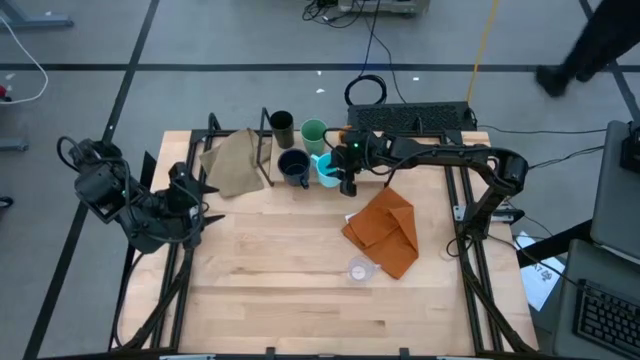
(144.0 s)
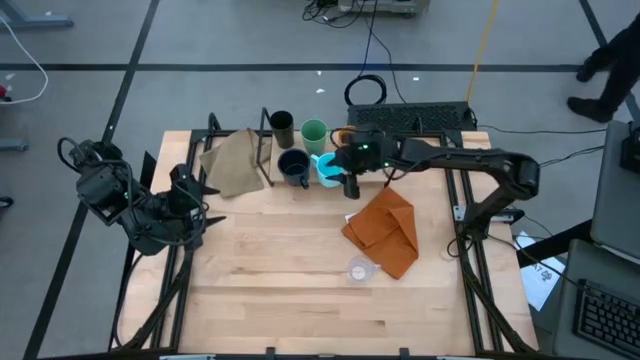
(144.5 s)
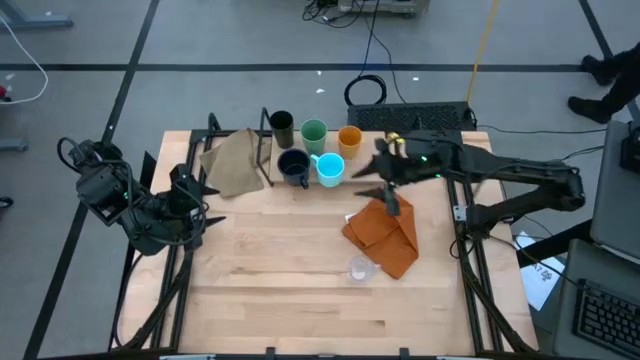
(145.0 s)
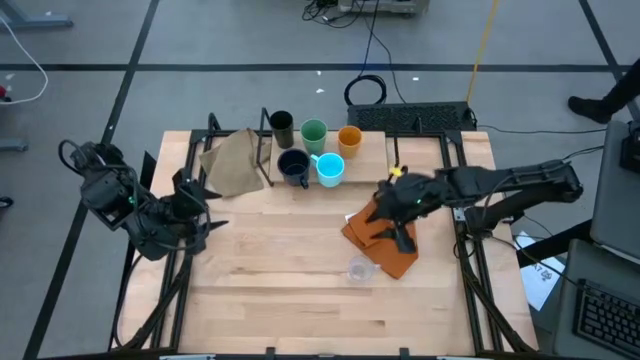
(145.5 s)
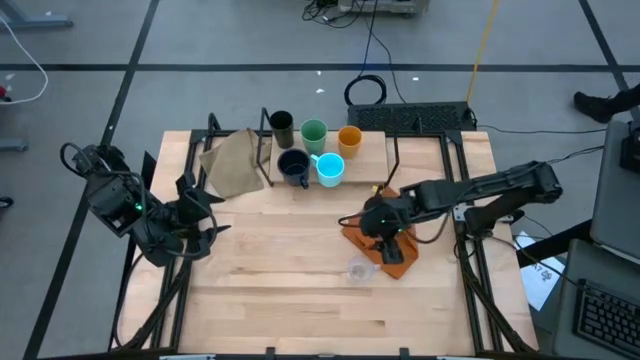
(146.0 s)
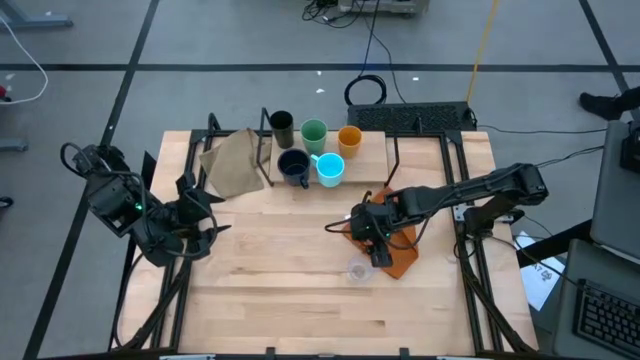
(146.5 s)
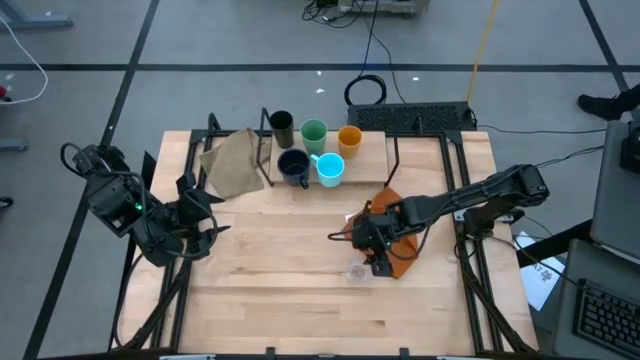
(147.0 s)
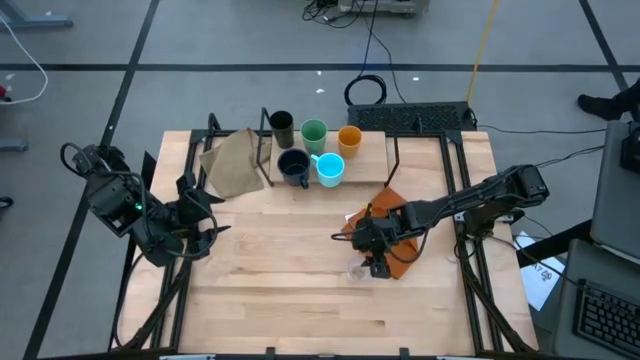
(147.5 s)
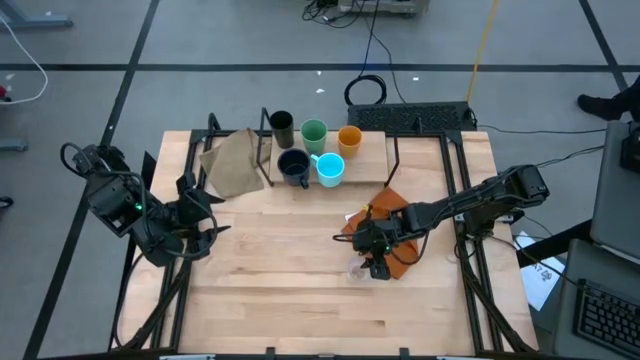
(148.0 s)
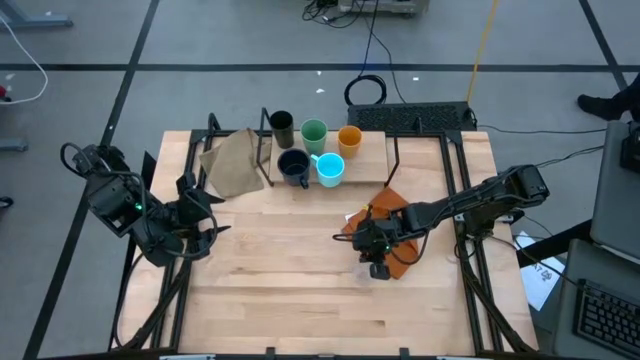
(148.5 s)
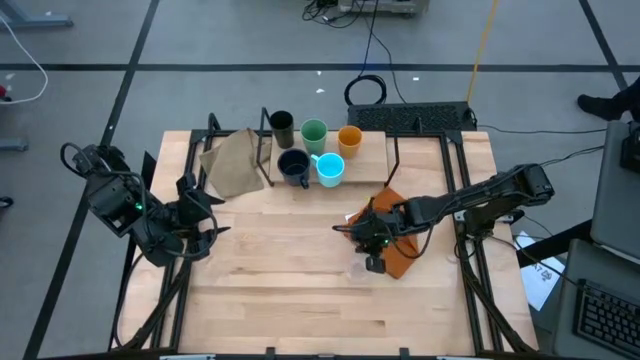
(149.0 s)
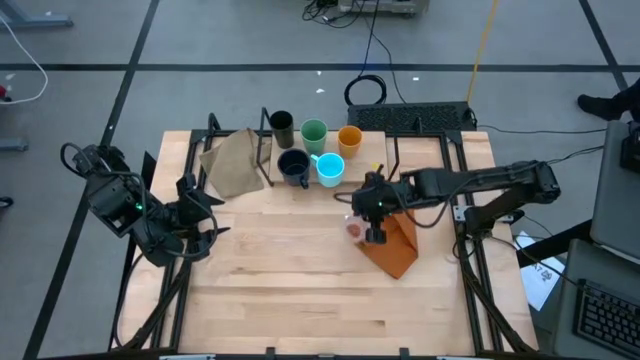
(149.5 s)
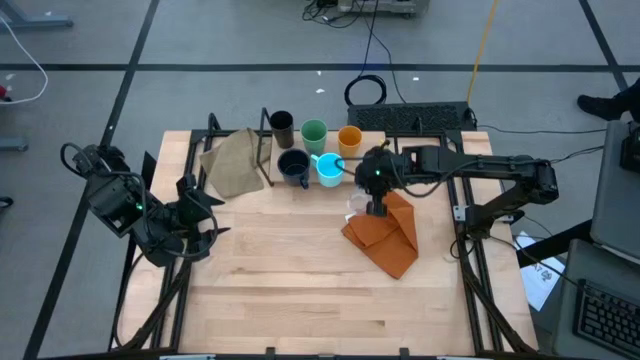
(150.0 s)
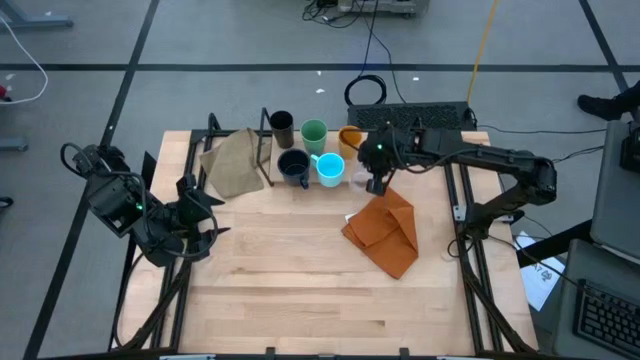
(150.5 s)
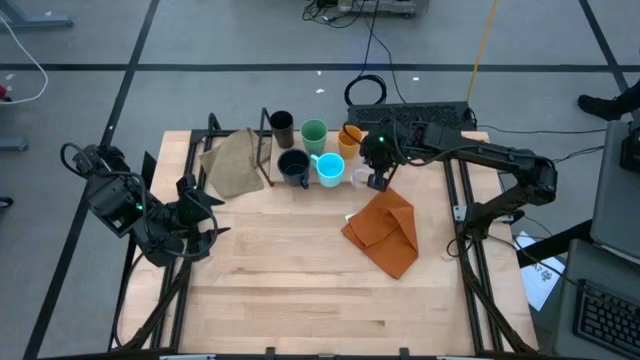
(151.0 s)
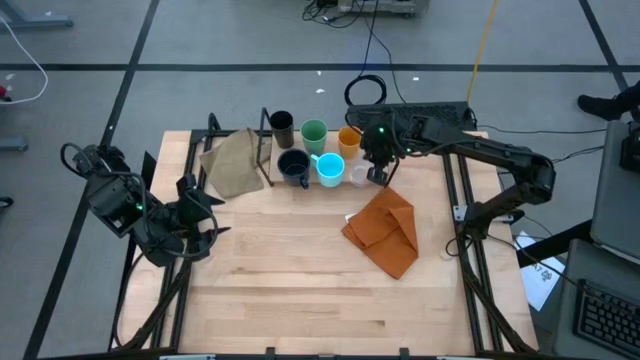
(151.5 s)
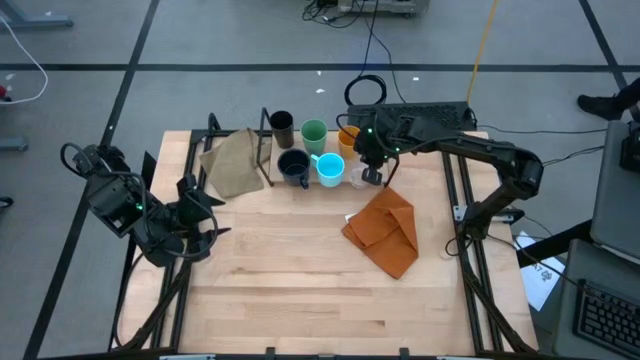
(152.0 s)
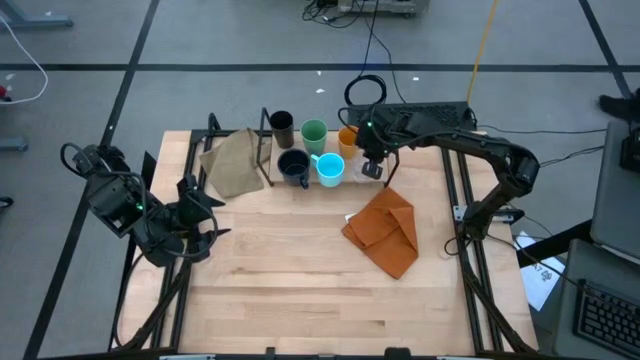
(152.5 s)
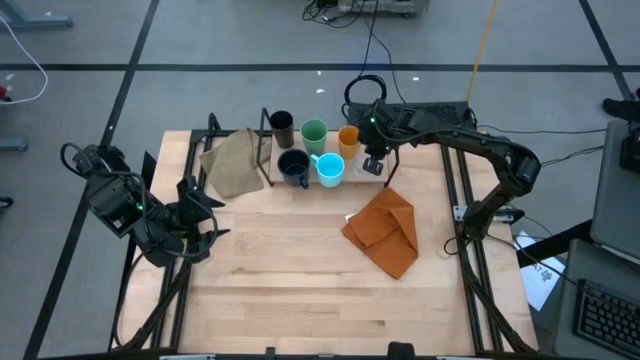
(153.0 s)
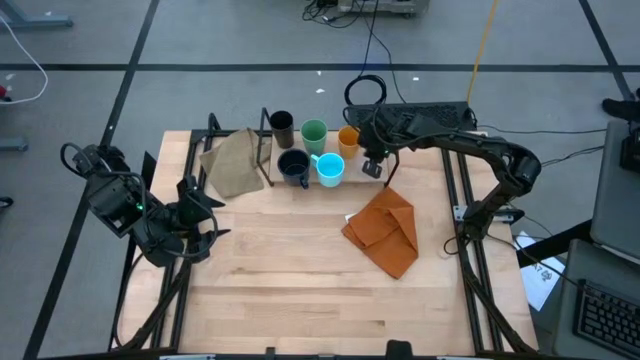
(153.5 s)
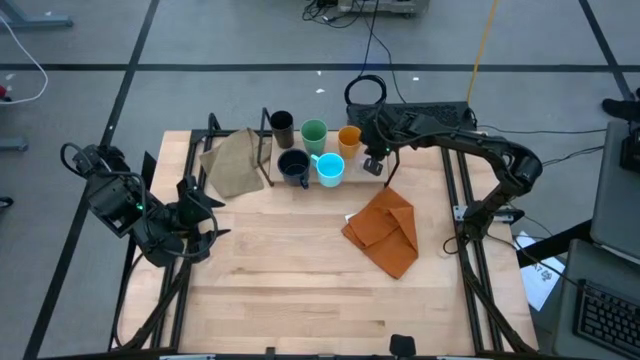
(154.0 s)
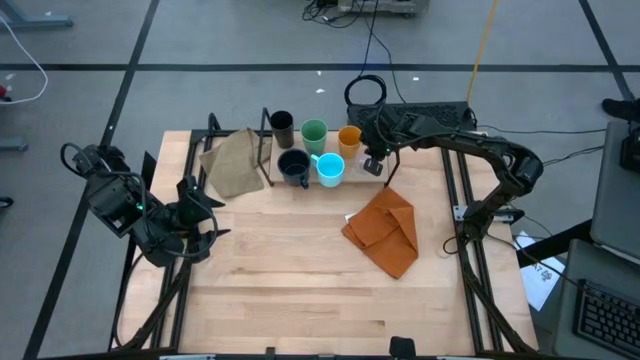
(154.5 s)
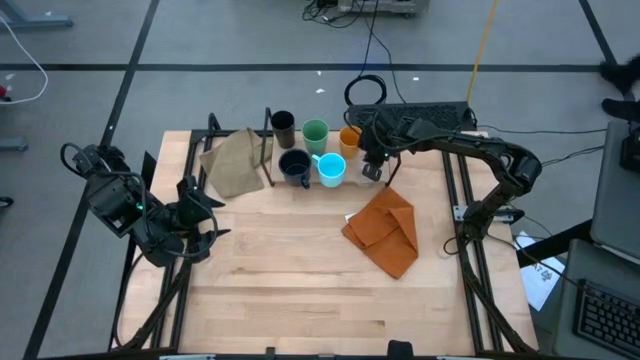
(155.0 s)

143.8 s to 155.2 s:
Task: Stack small to large cups/mugs on shelf
Put the transparent mug on the shelf

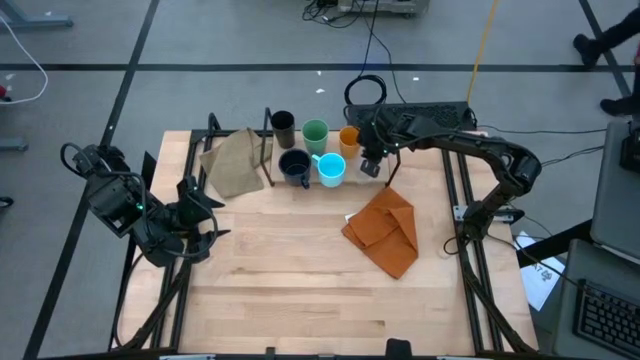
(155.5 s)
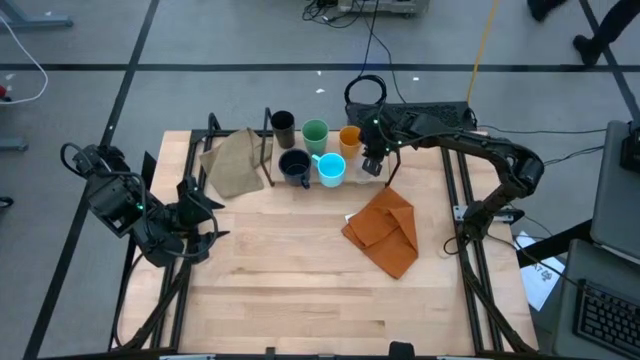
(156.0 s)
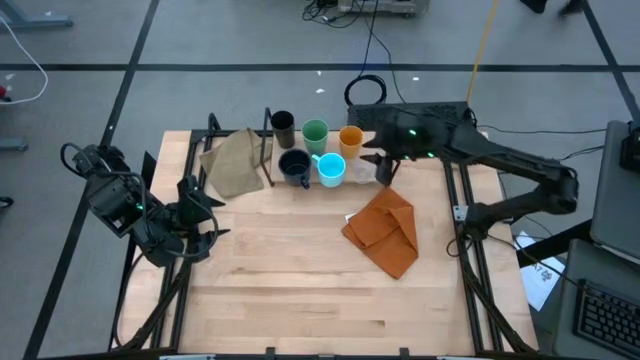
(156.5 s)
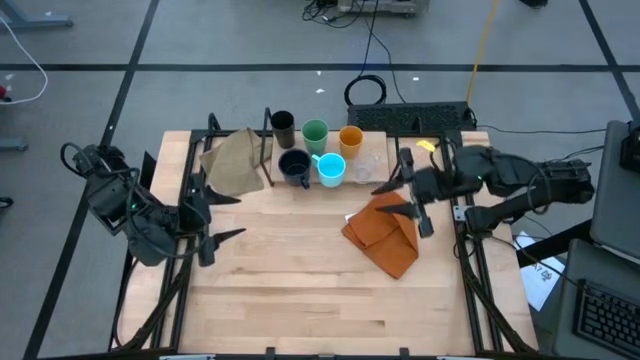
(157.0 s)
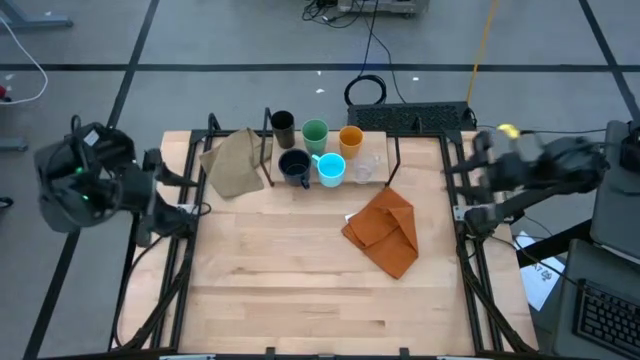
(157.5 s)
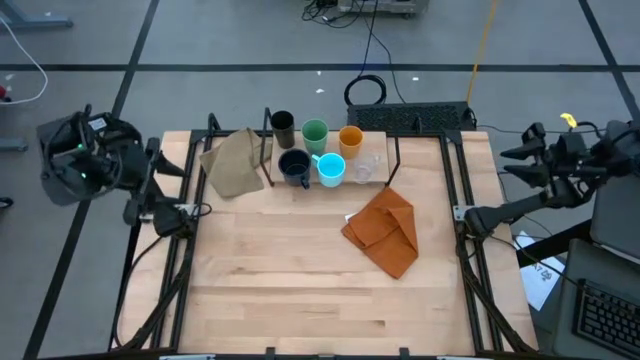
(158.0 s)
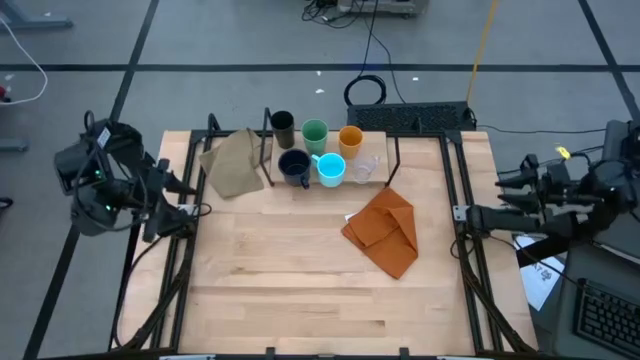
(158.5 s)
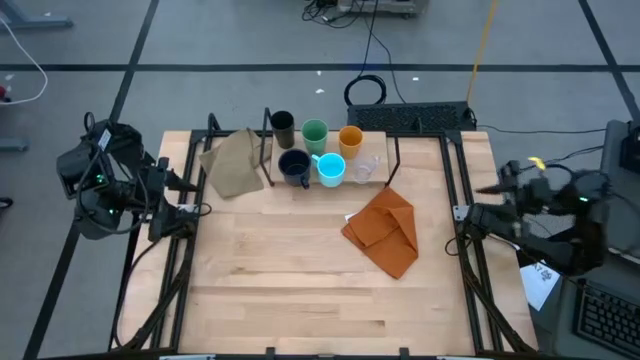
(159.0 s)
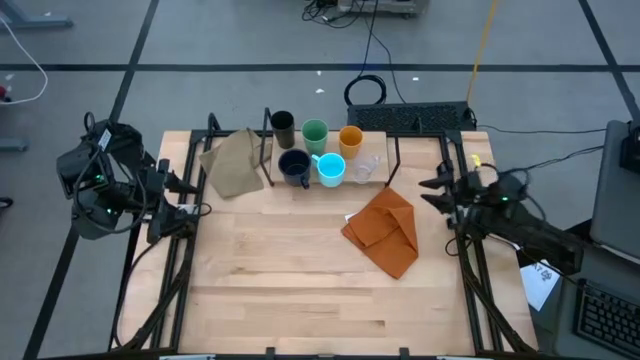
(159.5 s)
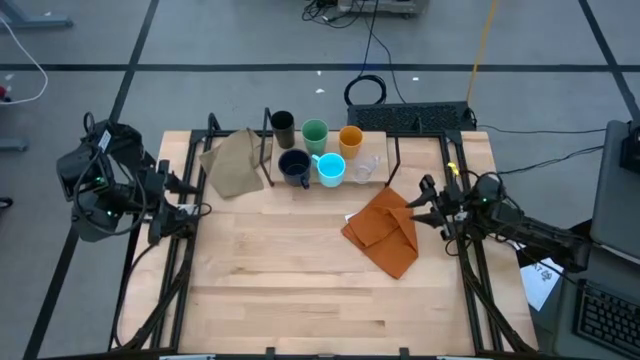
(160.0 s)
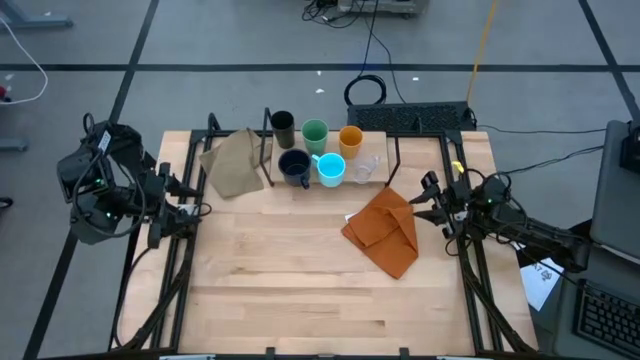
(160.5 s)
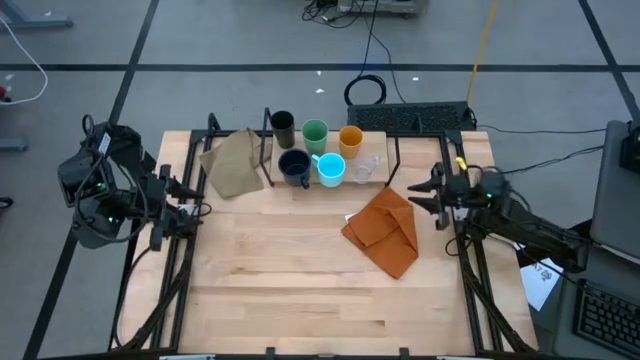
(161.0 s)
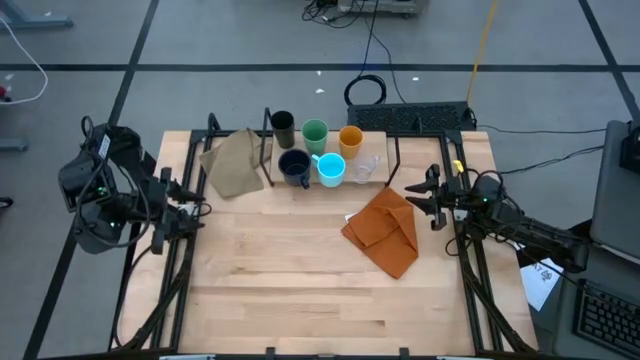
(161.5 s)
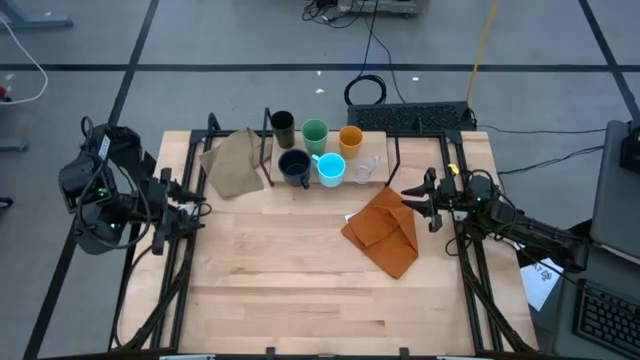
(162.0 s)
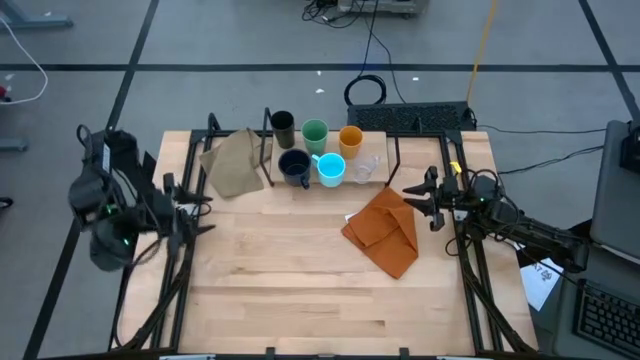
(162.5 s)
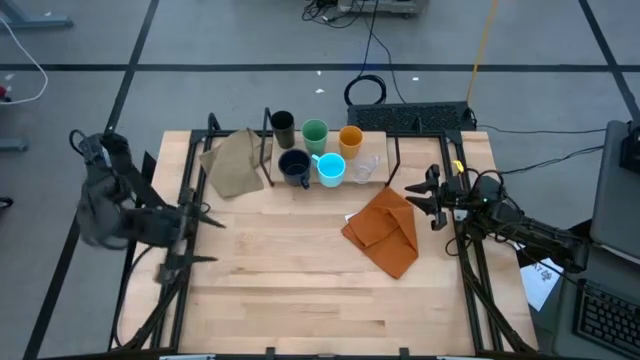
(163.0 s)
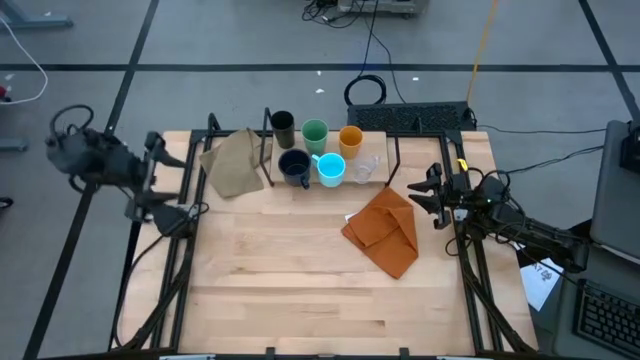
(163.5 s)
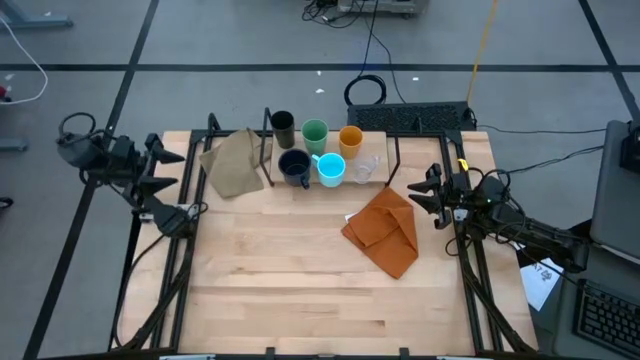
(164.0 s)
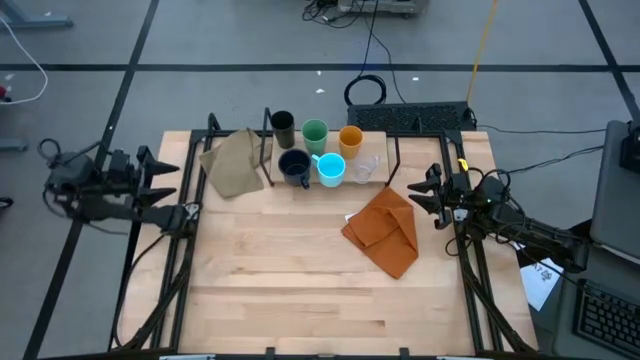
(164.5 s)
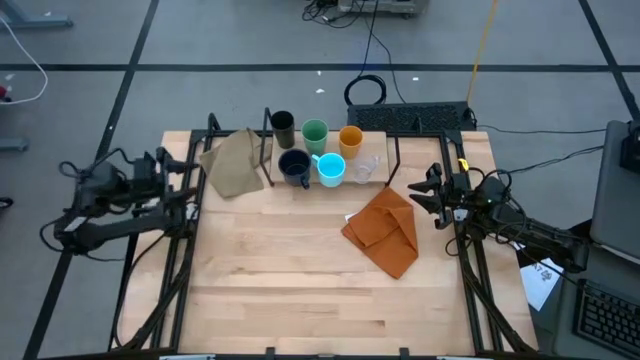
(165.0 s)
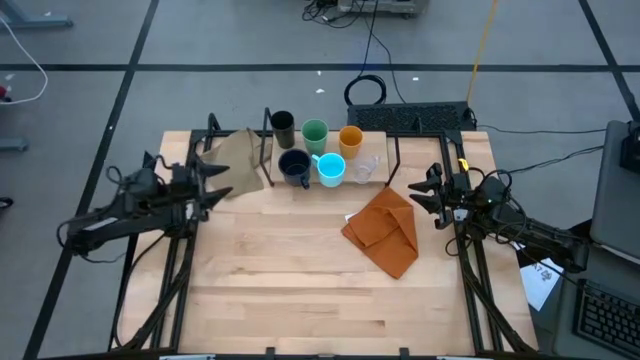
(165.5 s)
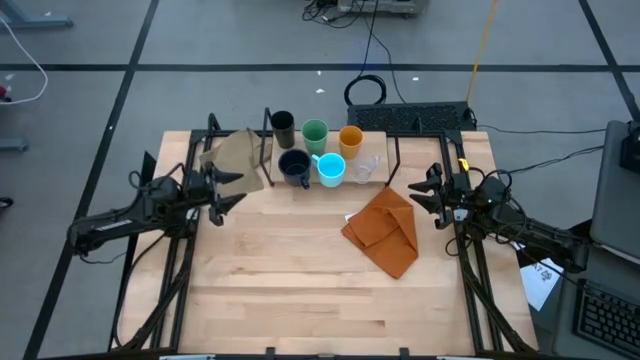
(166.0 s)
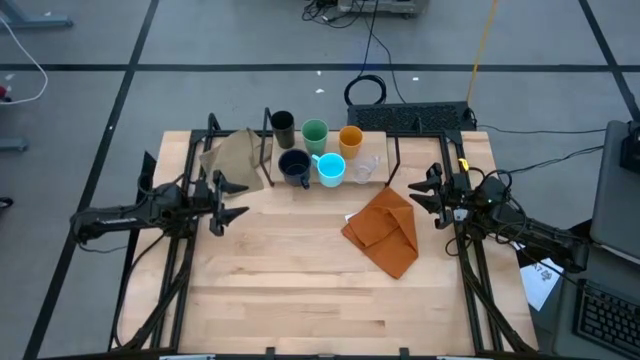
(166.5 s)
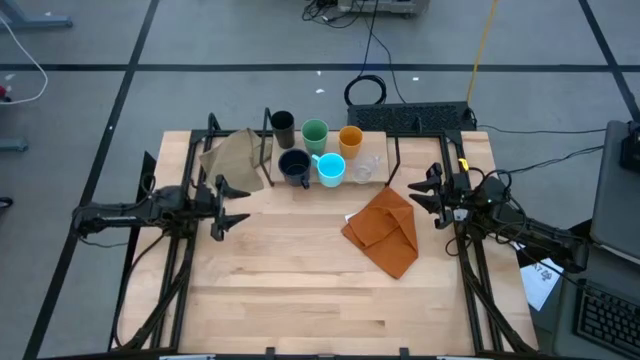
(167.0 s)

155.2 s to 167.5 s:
Return to Home Position
